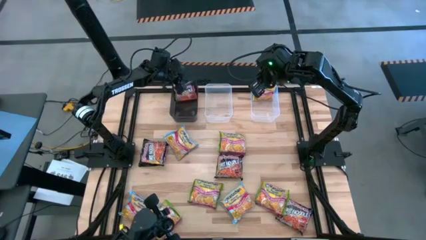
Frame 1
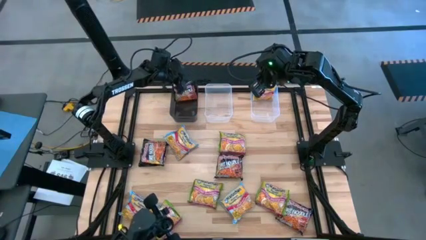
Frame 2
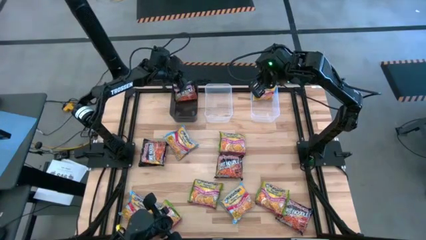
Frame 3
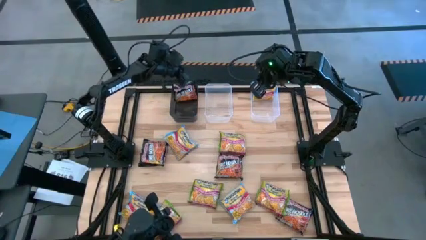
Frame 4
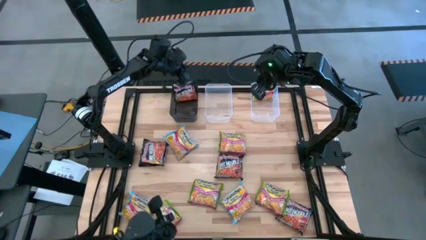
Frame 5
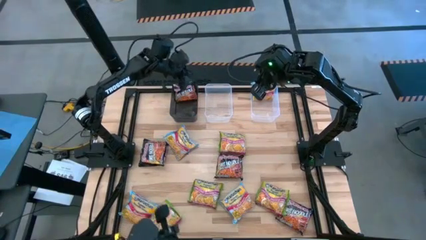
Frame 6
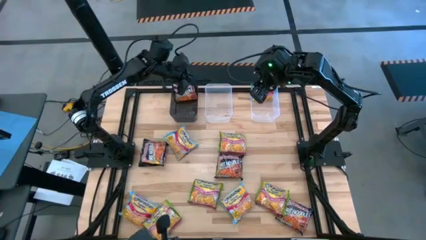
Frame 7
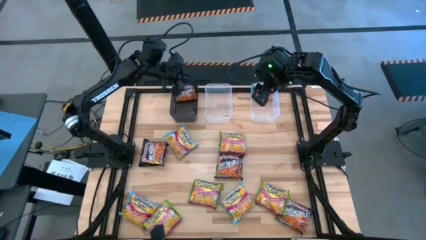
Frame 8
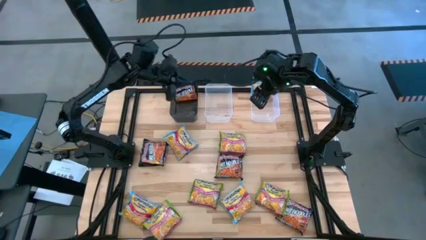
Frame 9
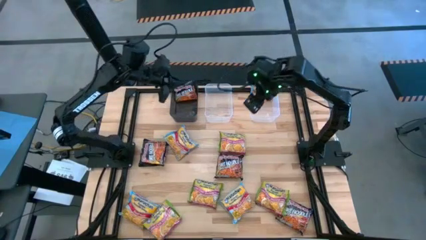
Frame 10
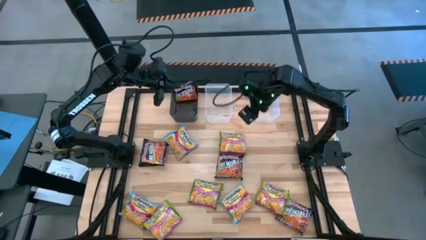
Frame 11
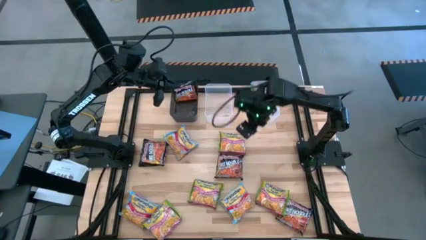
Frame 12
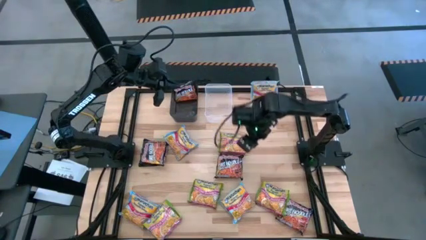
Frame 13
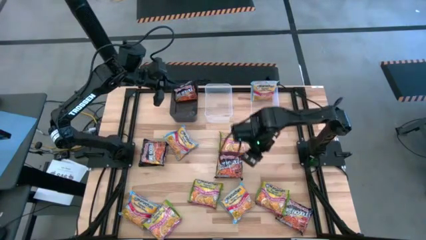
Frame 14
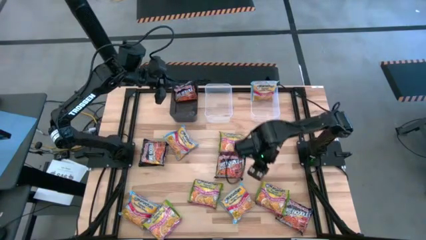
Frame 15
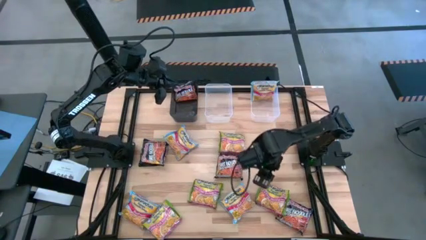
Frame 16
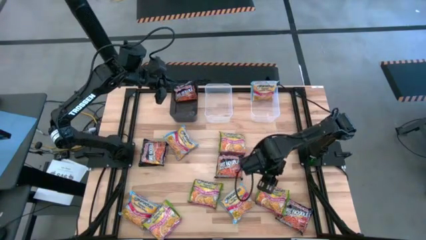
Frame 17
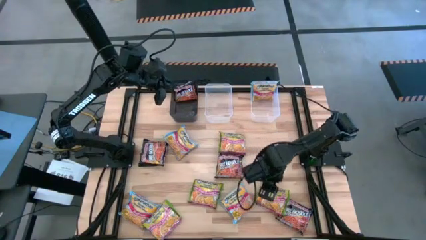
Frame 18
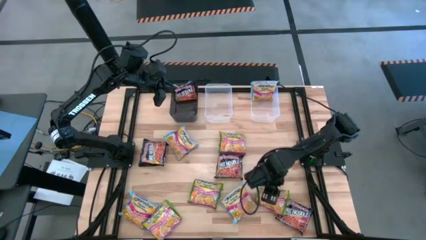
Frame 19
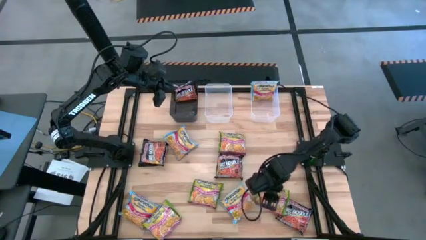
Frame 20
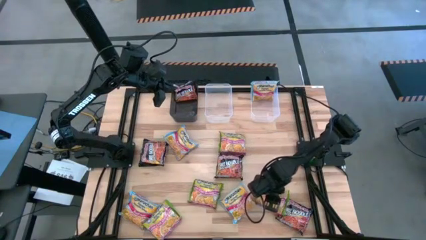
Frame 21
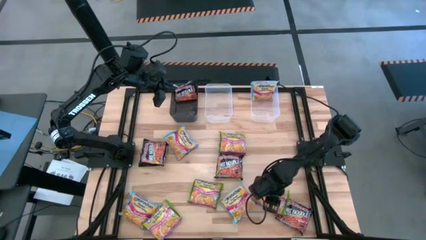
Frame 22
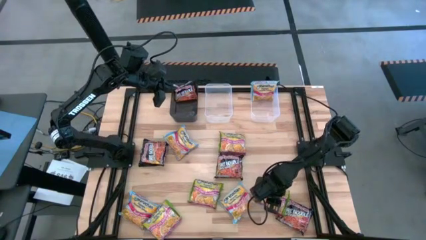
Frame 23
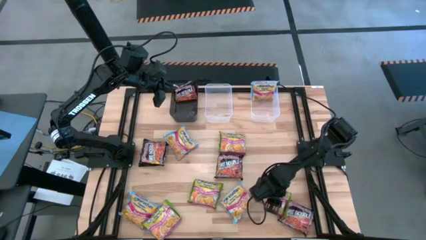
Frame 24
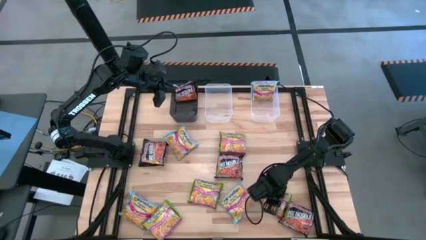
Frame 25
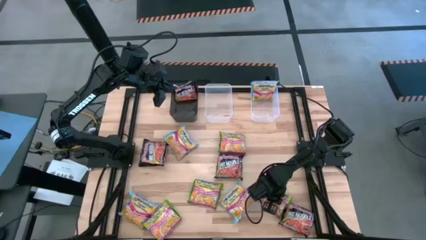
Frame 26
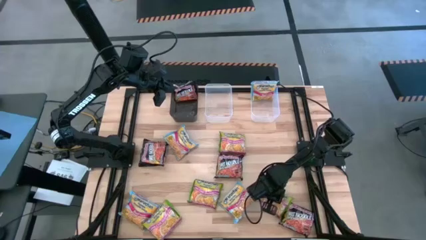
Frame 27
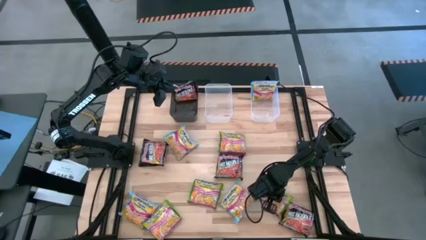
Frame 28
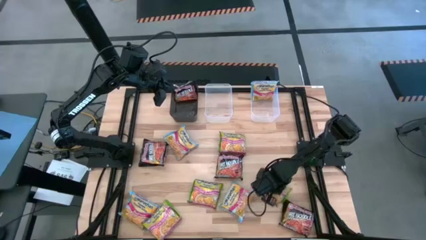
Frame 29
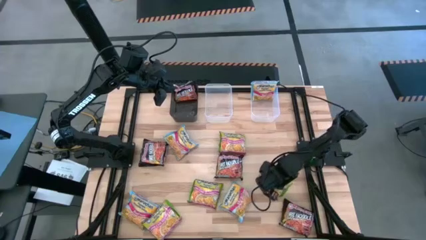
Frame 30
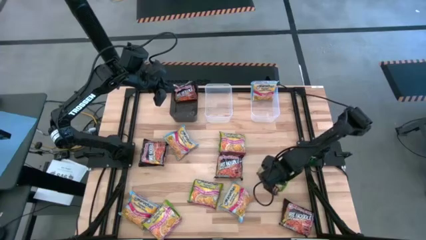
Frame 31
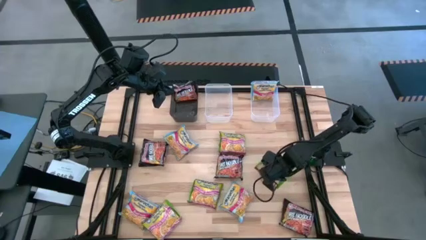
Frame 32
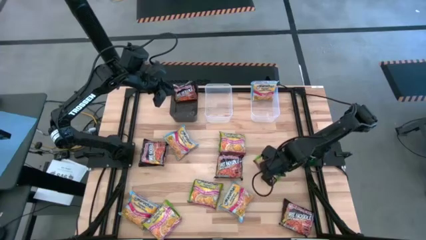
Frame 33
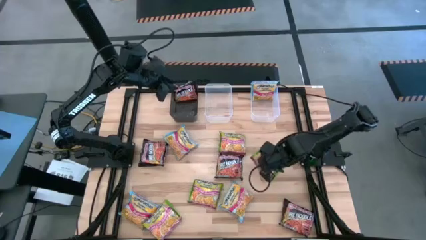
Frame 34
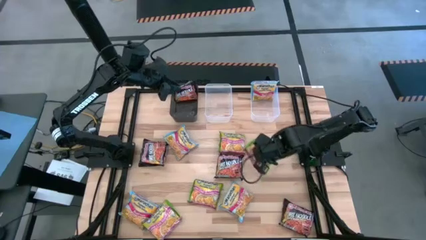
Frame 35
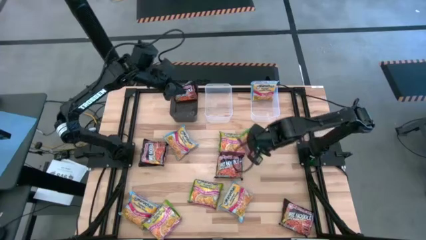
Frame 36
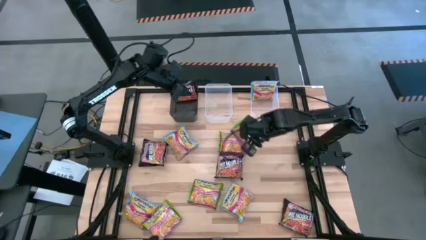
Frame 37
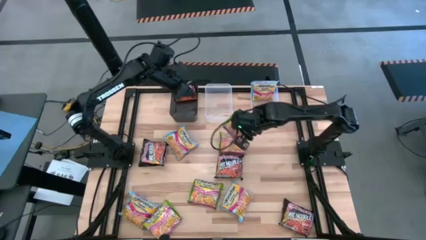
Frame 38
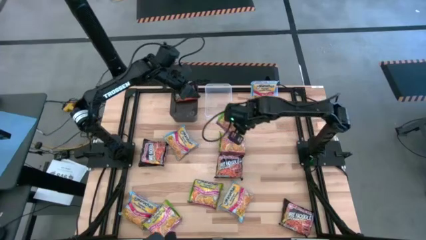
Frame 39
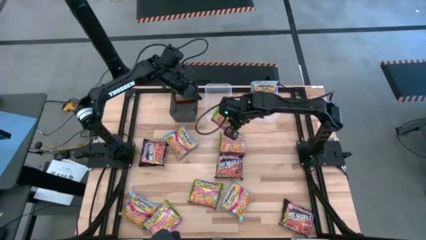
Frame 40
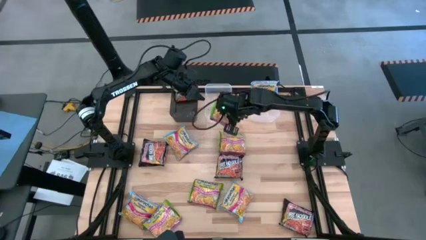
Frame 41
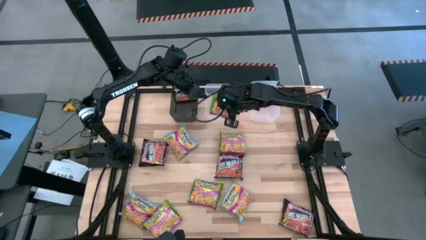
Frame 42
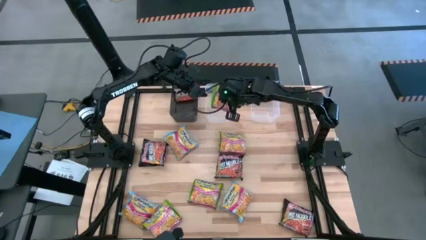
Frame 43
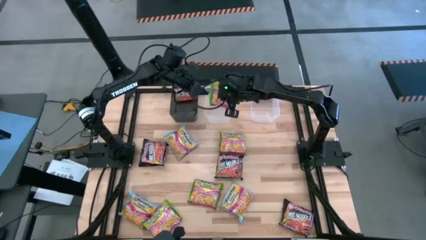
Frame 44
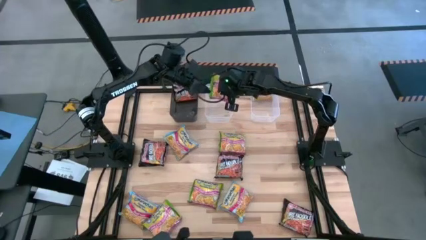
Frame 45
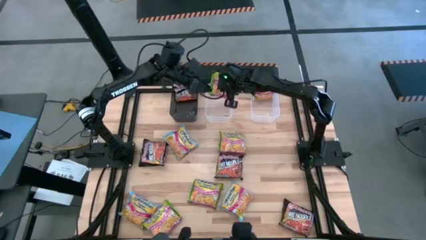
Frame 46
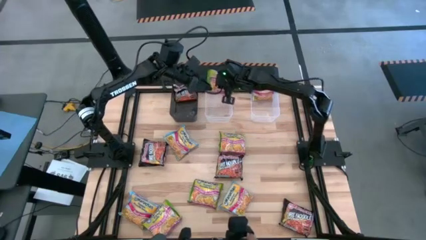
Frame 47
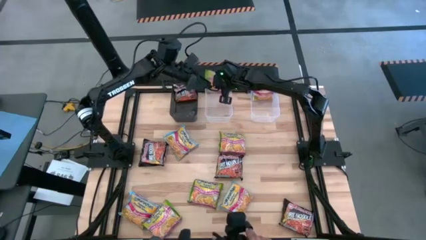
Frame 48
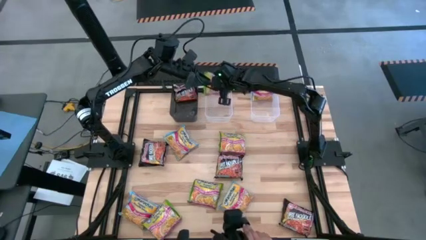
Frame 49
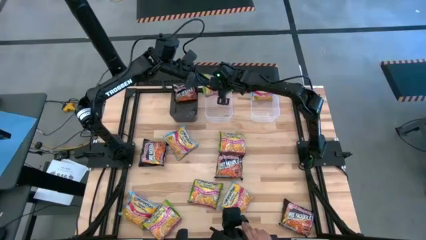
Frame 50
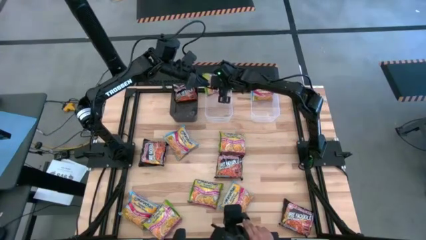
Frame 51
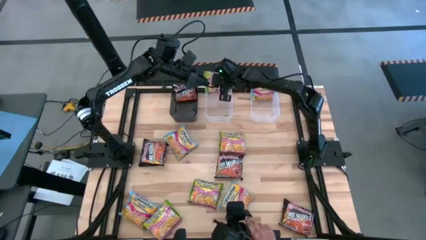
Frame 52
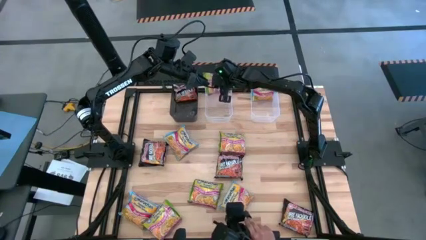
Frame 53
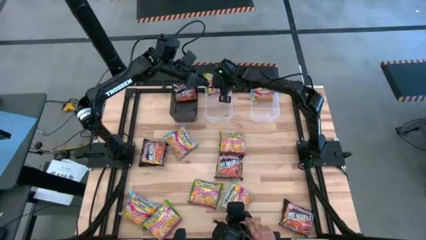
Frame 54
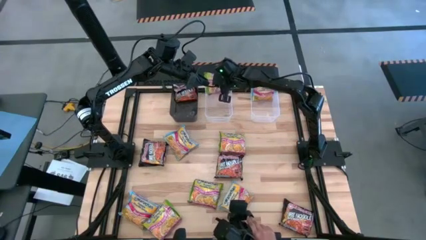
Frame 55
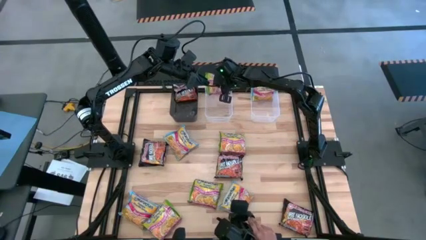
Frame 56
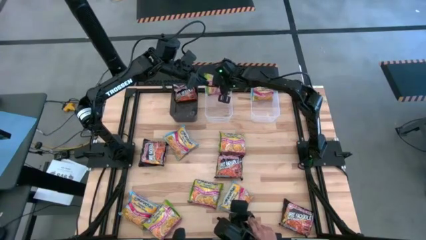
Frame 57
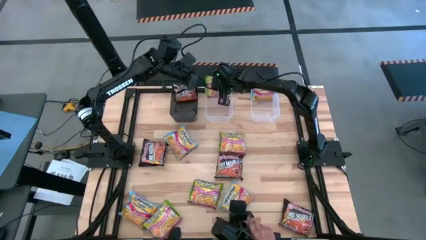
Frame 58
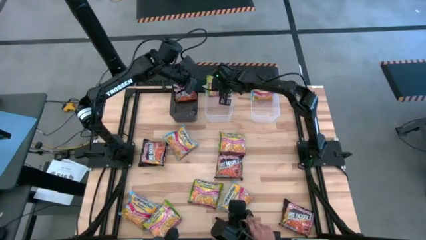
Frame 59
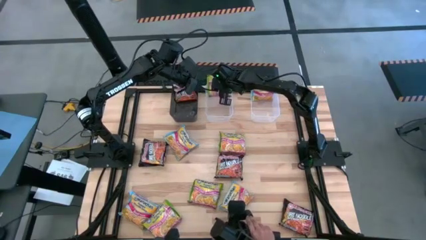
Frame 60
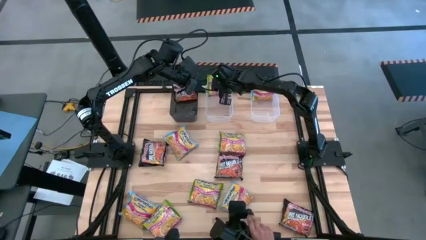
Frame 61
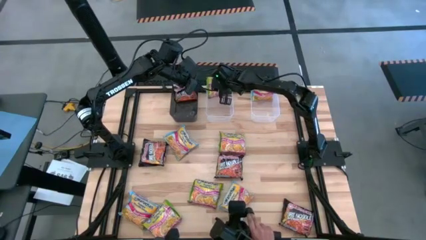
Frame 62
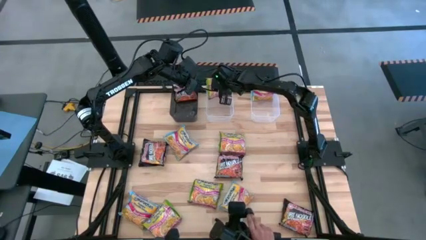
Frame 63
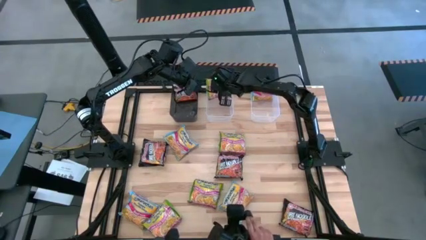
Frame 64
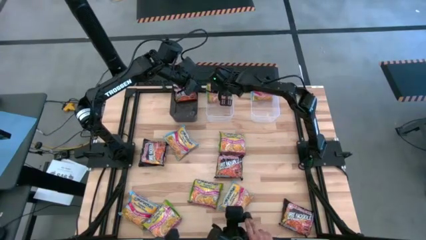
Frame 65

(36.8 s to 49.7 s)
Task: Sort Maruchan noodles
Put the green noodle pack into the left transparent bin

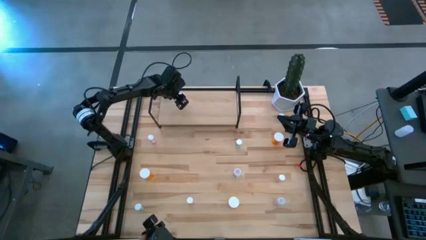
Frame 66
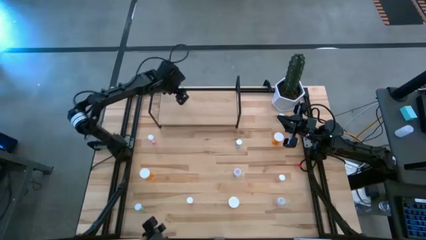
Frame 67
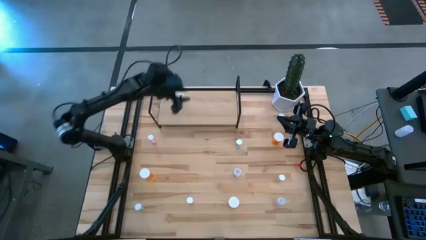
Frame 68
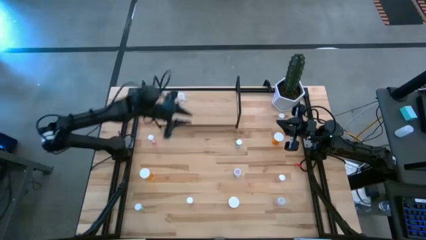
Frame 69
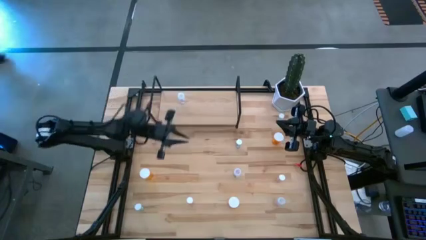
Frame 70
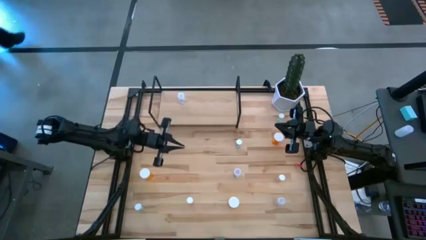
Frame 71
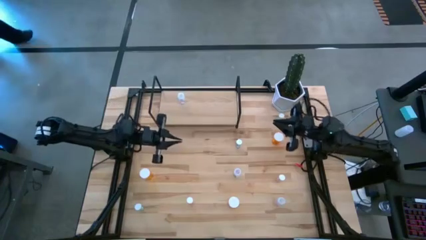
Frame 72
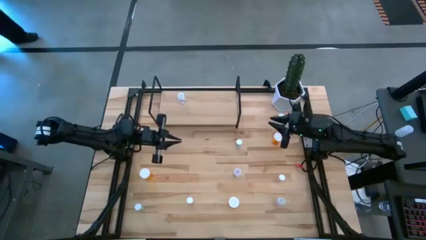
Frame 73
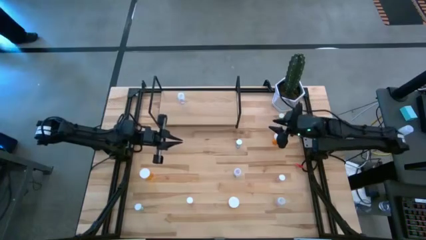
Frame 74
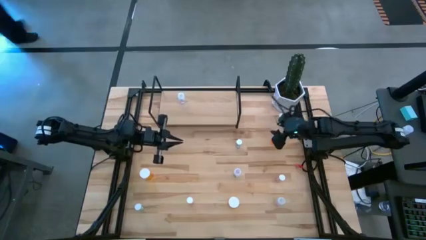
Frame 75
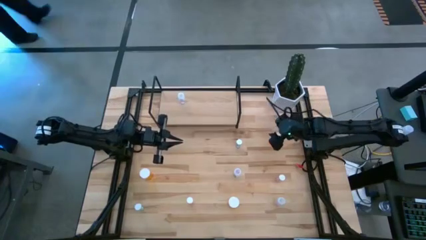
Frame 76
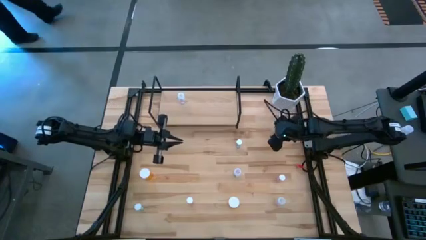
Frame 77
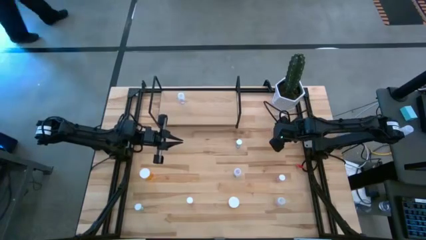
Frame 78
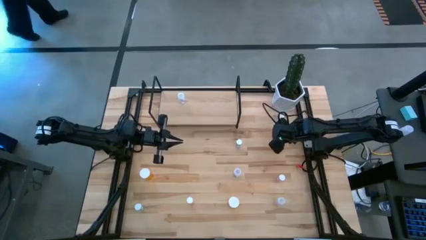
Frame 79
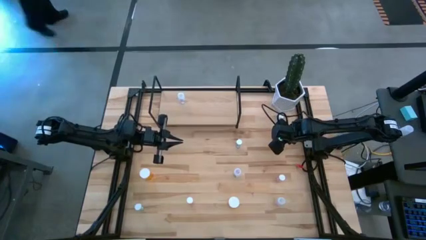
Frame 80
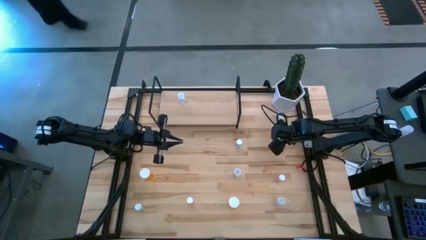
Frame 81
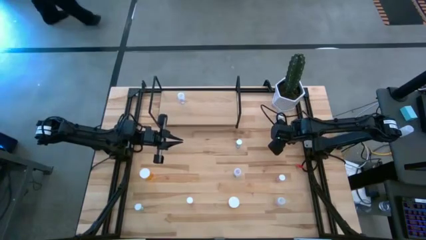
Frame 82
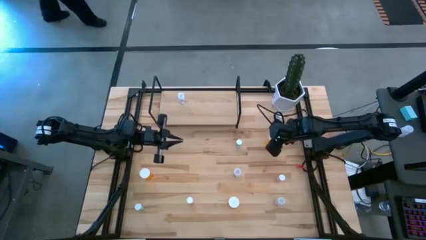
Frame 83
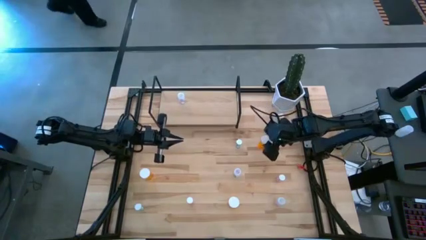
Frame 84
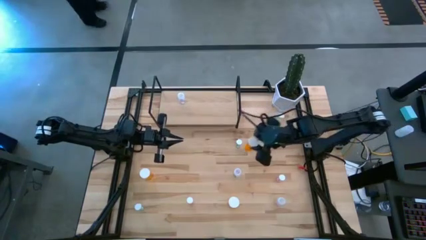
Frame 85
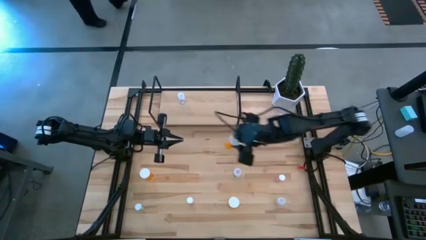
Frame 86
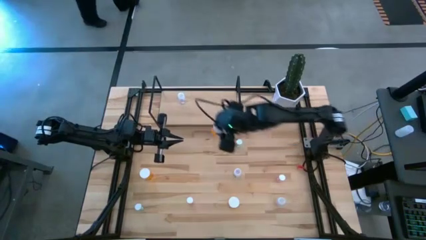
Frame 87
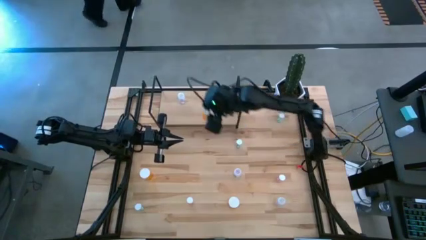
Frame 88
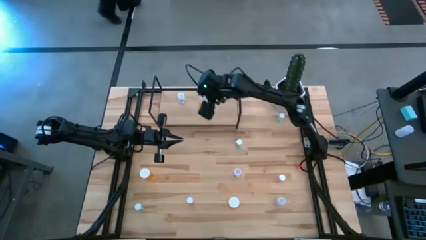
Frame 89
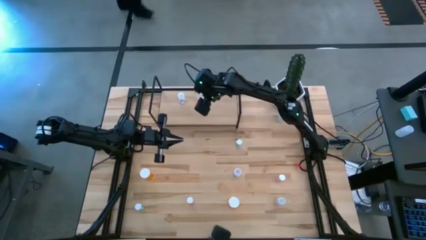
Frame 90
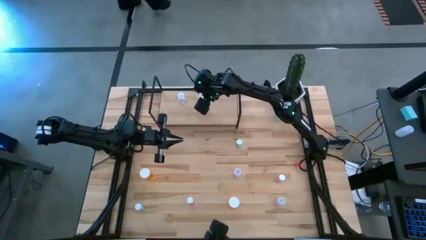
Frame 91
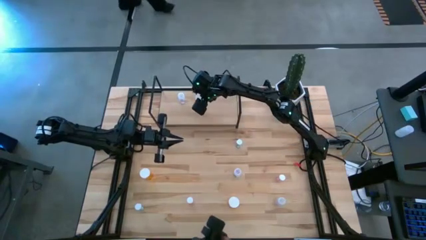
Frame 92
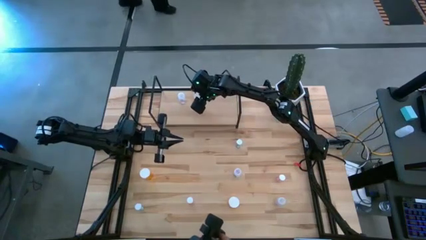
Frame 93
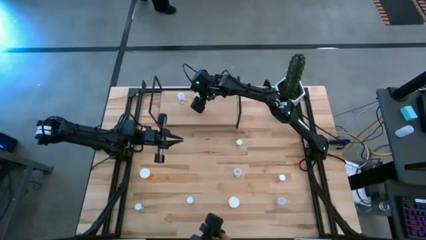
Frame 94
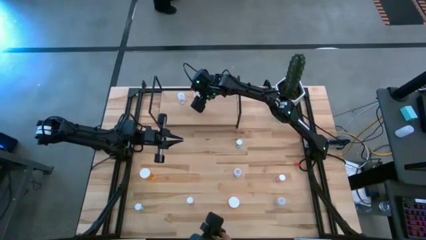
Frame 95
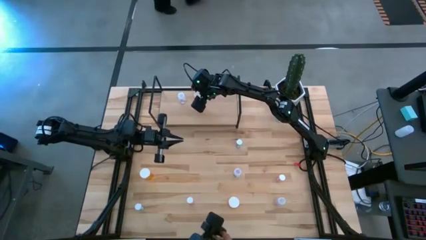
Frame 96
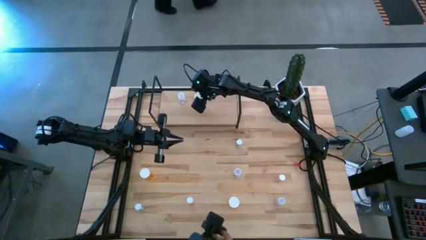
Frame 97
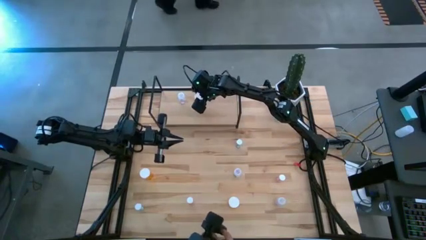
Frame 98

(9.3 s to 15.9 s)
Task: Pick and place medicine bottles onto shelf by color
Put the top orange pill bottle on the shelf
